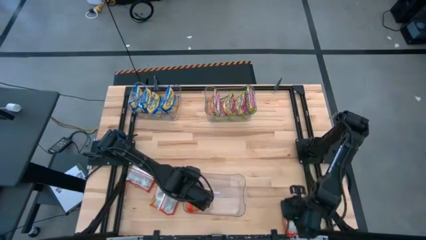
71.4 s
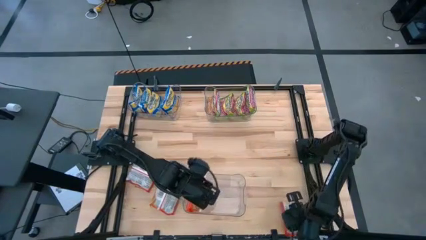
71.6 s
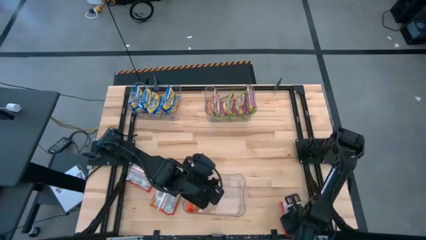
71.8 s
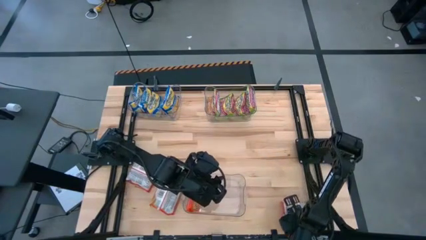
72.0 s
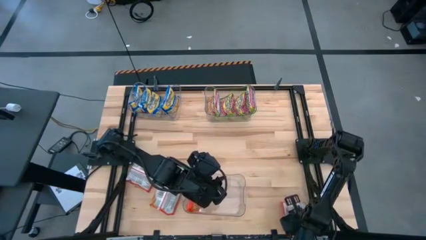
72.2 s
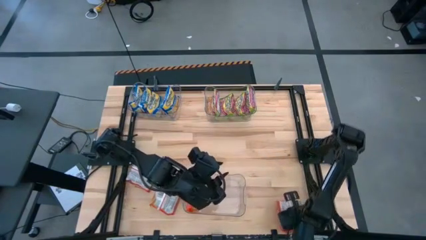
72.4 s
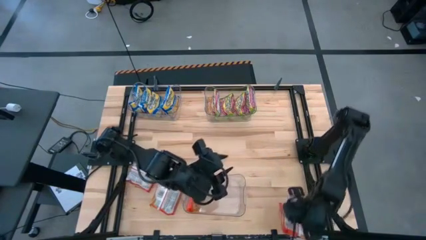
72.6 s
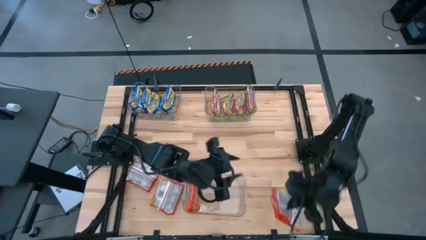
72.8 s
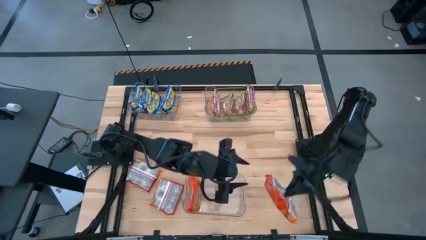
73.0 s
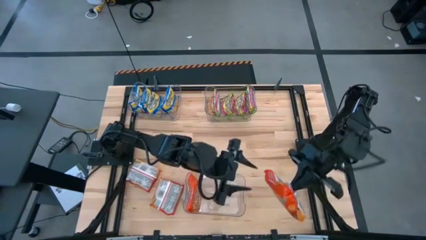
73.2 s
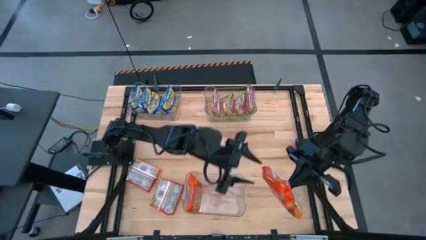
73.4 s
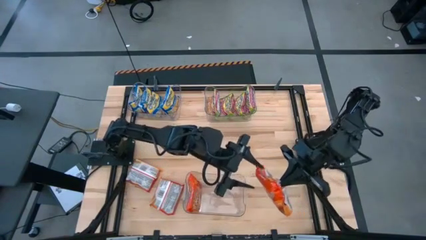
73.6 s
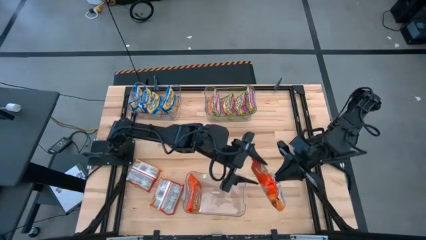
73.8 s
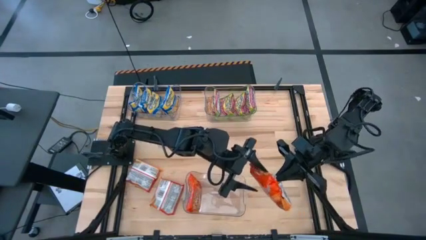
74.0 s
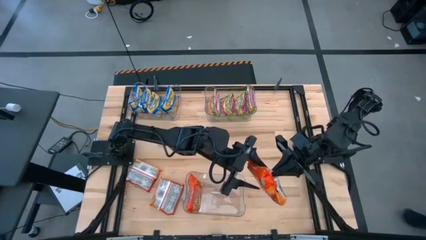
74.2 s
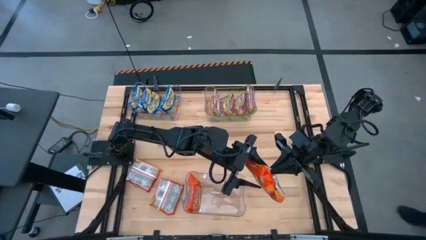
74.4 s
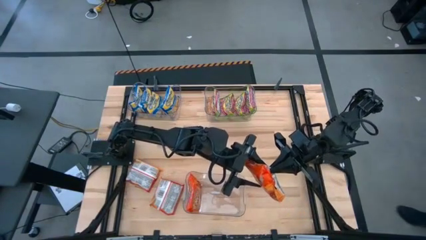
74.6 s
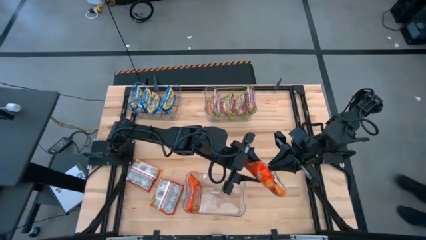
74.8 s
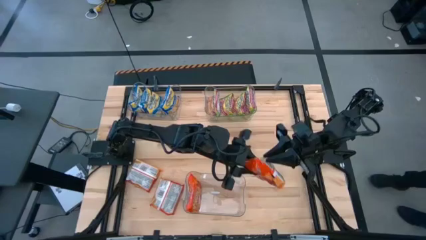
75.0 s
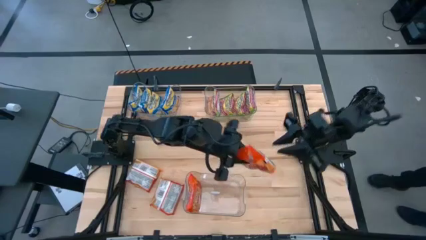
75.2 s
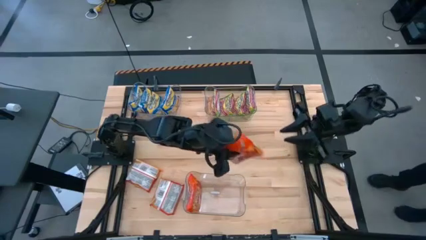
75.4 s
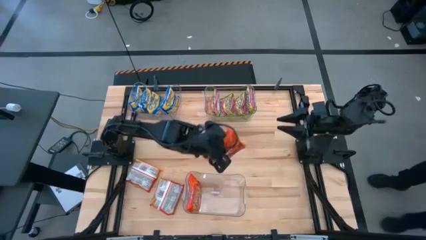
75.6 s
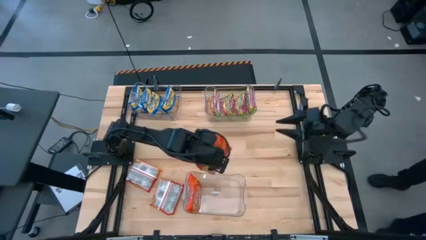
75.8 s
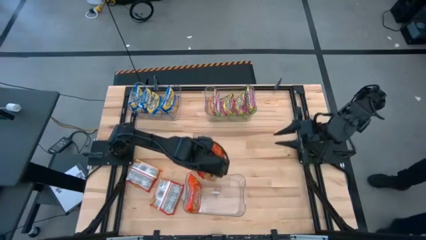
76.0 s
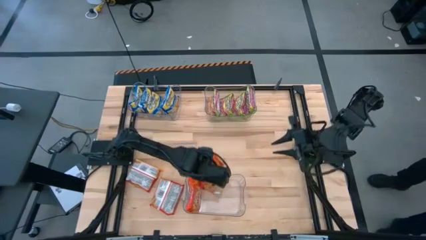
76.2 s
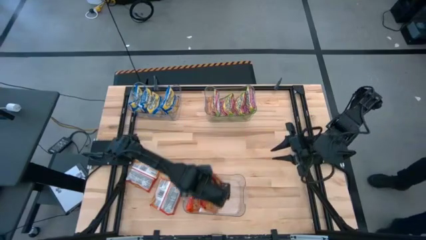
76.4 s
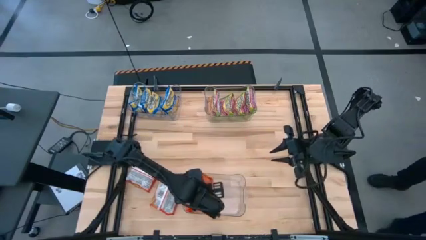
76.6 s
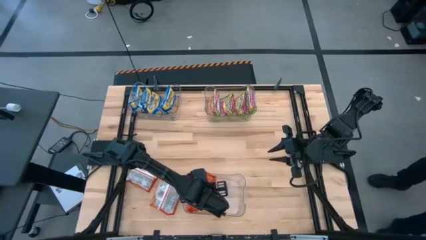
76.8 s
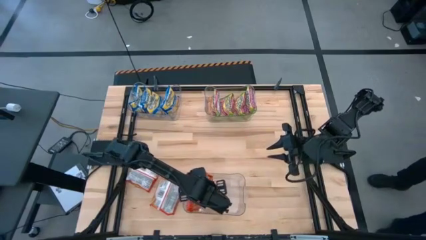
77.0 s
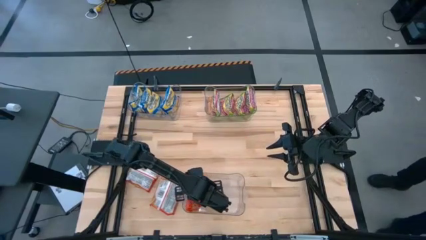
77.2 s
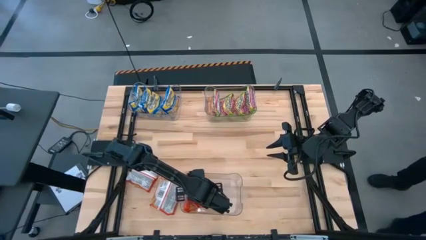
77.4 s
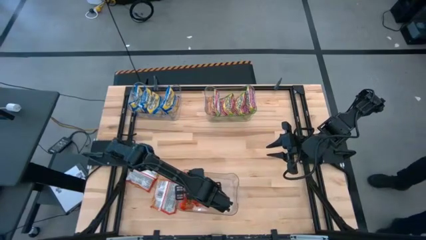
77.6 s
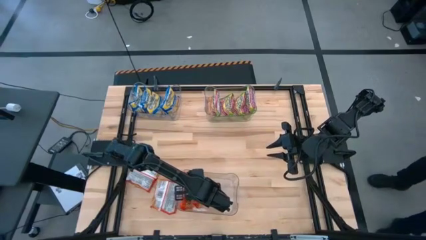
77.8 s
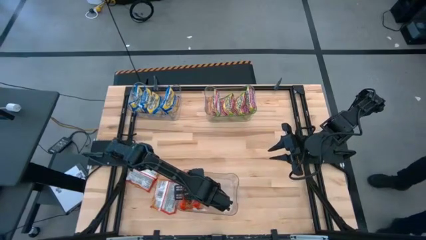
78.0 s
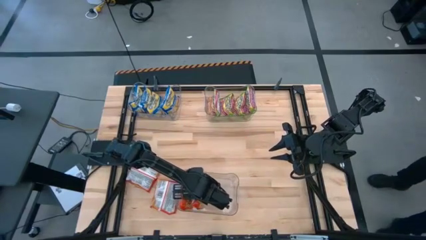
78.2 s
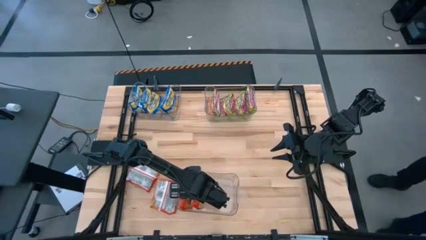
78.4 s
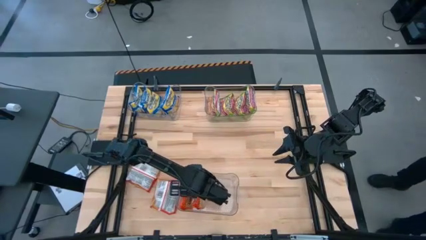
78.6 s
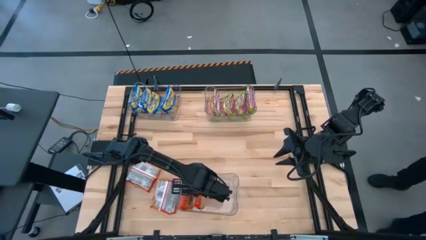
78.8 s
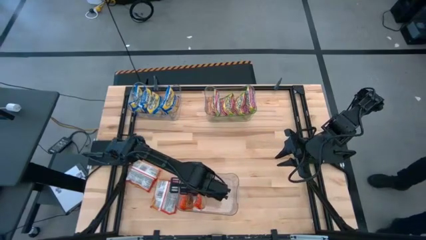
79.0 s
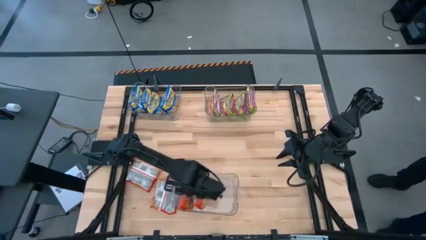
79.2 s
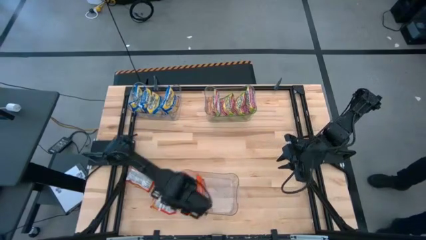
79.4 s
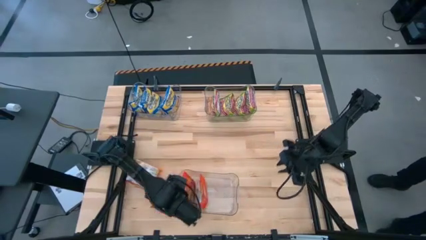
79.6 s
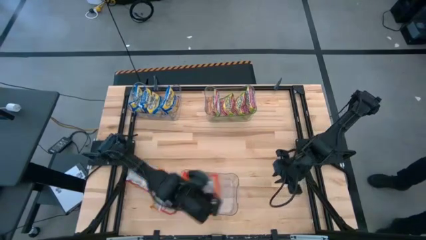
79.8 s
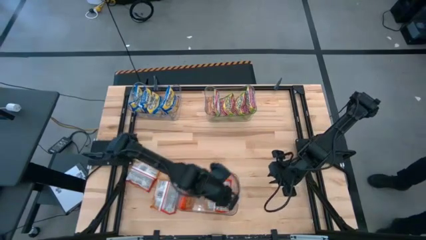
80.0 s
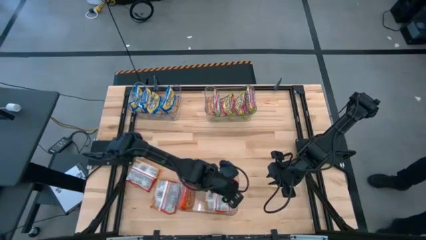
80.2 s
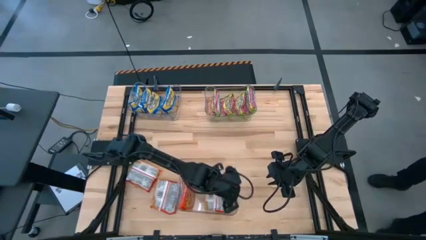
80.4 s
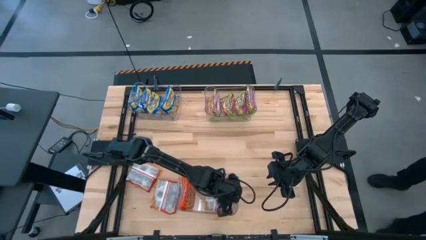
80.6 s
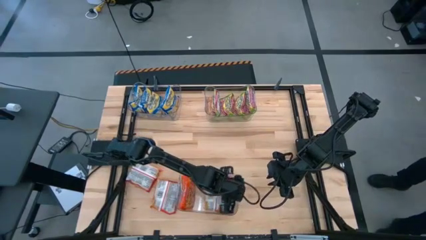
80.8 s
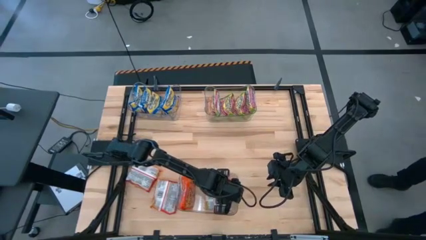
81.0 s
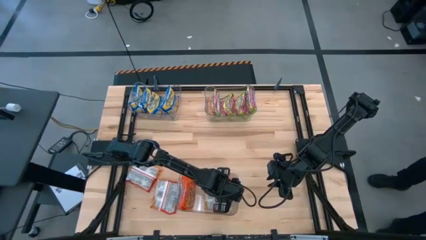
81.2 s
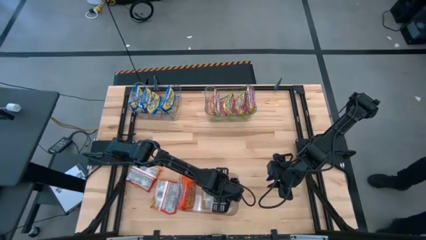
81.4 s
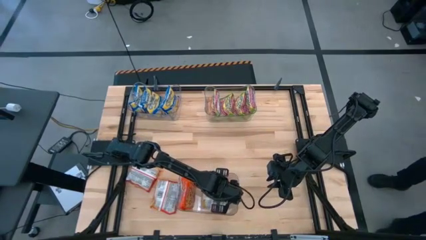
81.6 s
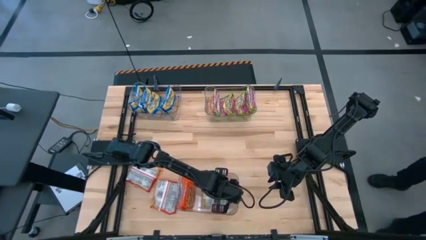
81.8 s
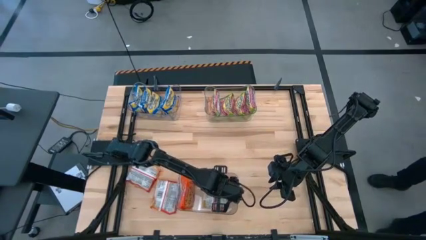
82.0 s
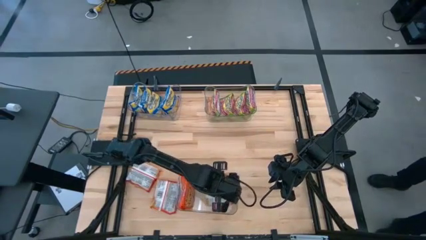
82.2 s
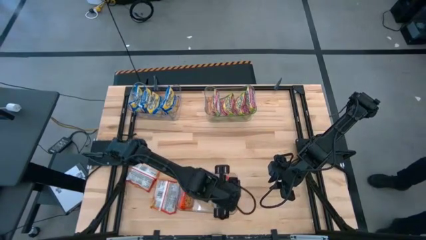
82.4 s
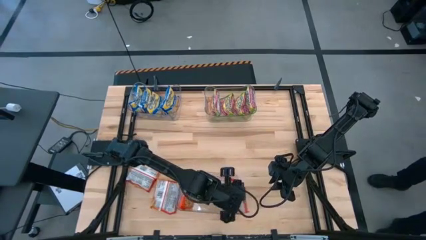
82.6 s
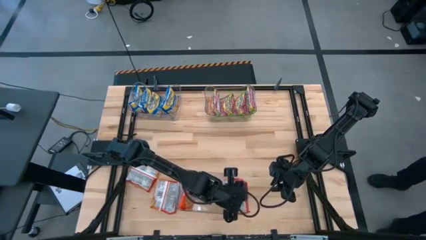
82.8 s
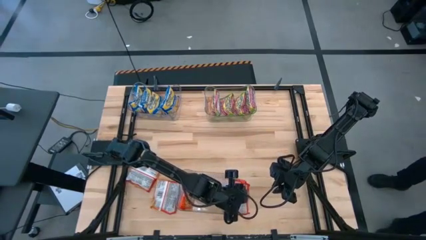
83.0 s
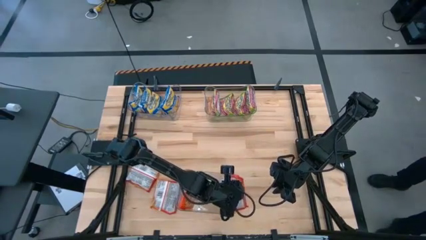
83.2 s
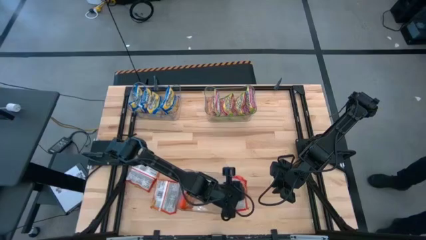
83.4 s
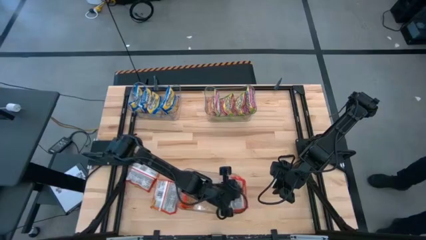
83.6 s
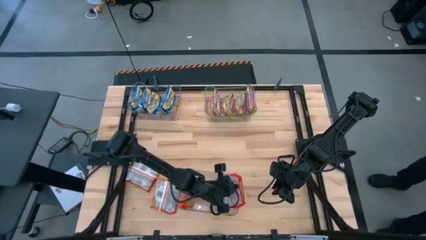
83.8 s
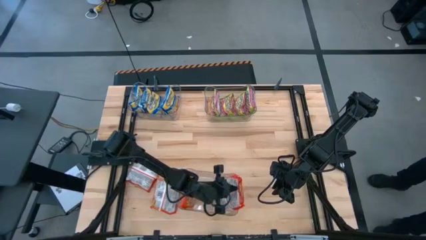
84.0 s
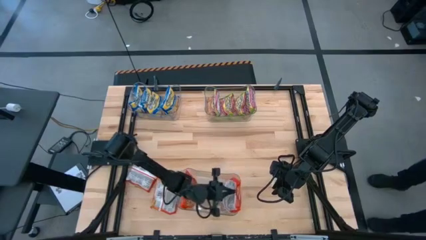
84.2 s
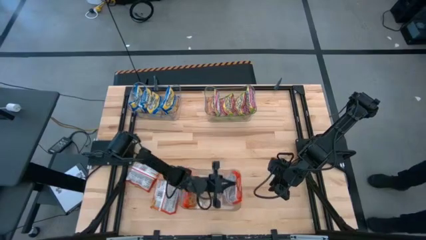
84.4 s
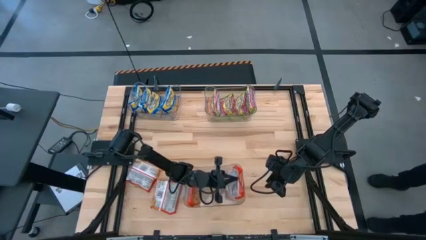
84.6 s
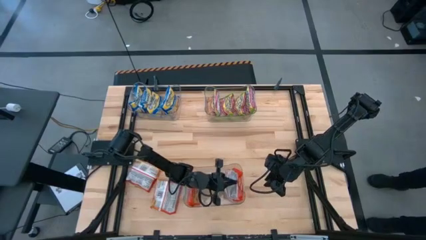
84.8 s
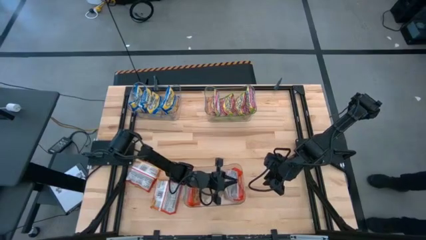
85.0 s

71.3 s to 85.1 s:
Task: Sort Maruchan noodles
Put the orange noodle pack into the bottom transparent bin
